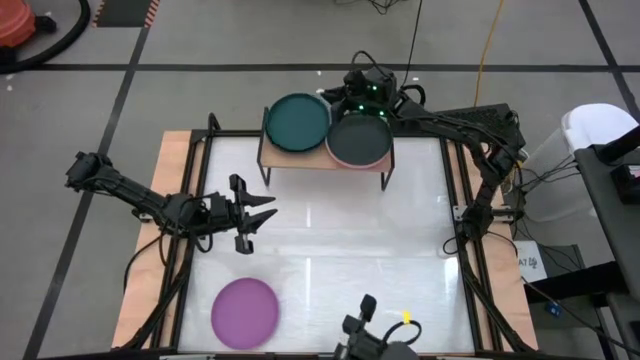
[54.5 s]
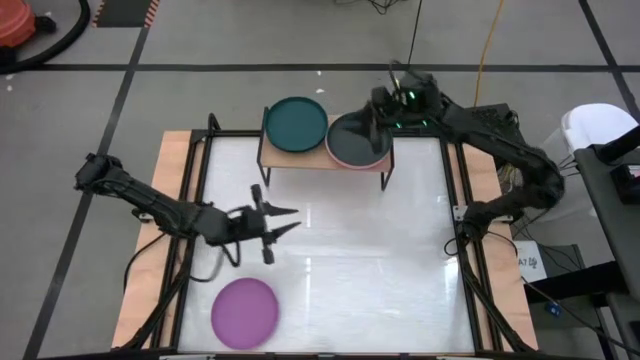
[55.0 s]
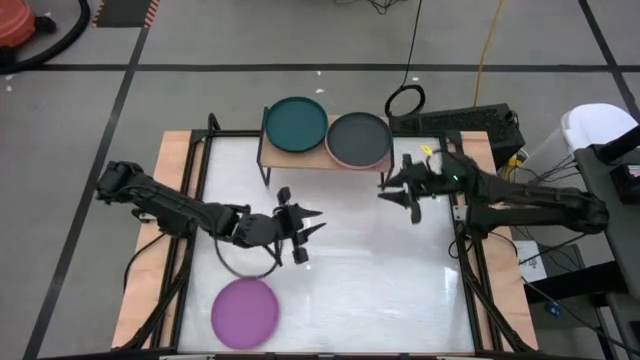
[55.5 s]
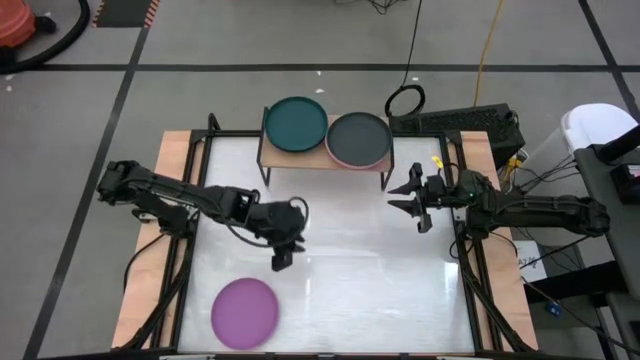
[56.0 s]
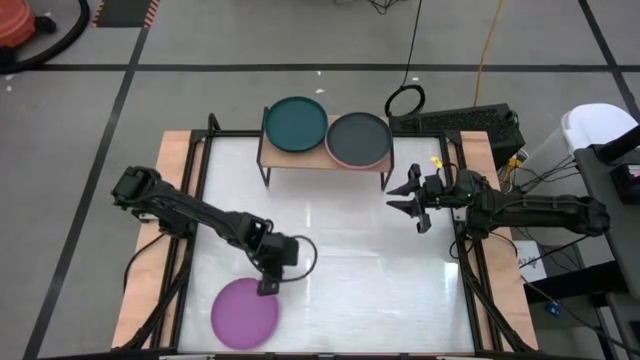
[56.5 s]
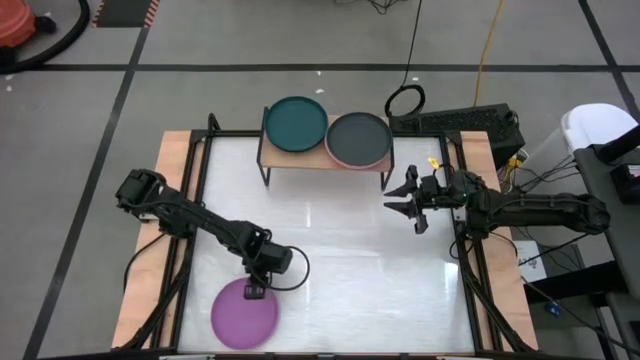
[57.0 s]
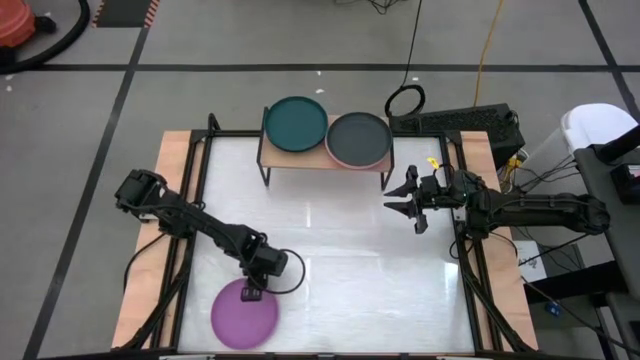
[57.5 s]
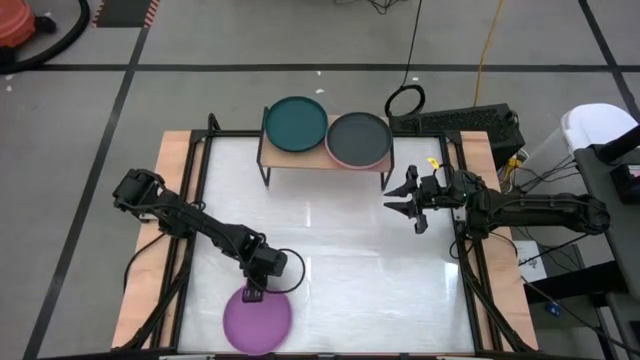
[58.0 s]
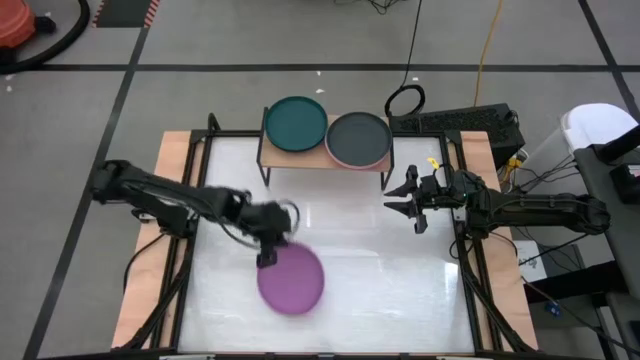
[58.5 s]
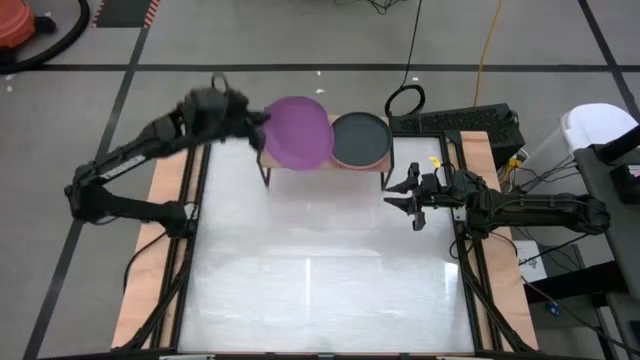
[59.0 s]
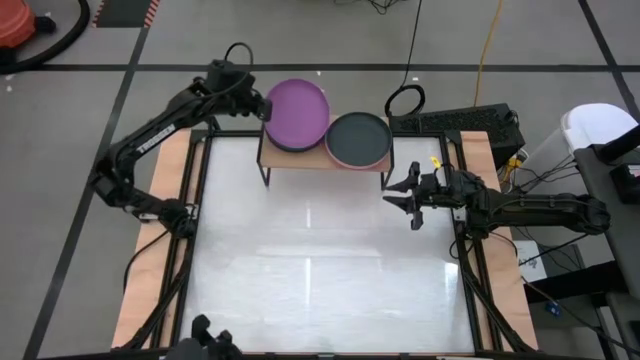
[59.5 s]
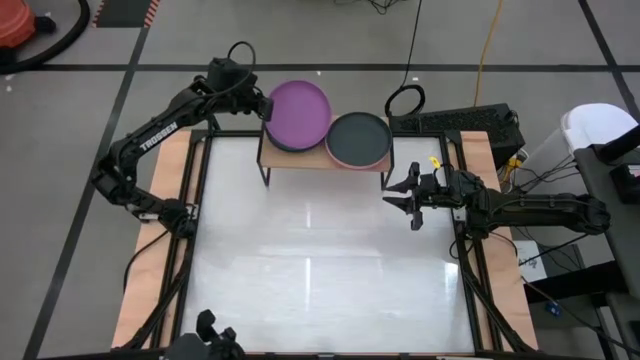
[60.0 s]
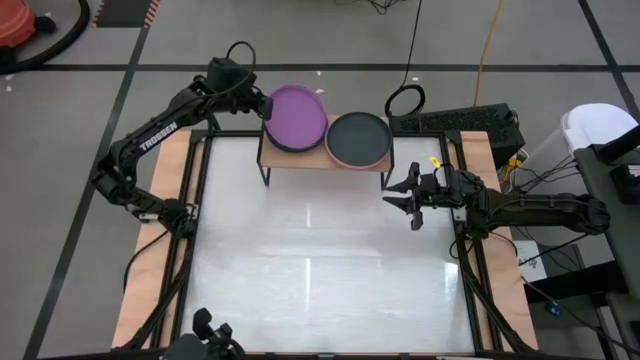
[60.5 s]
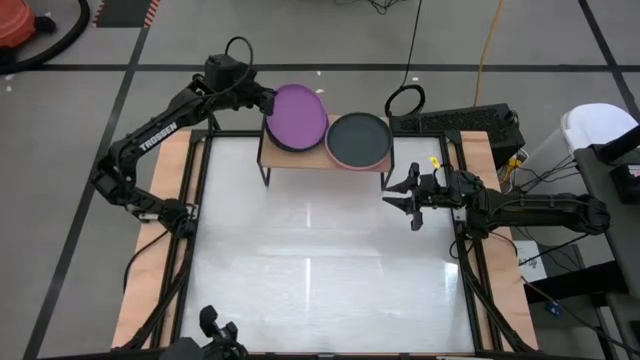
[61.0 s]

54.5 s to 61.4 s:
Task: Place and stack plates onto a shelf
Stack the violet plate on top of the dark green plate on the shelf

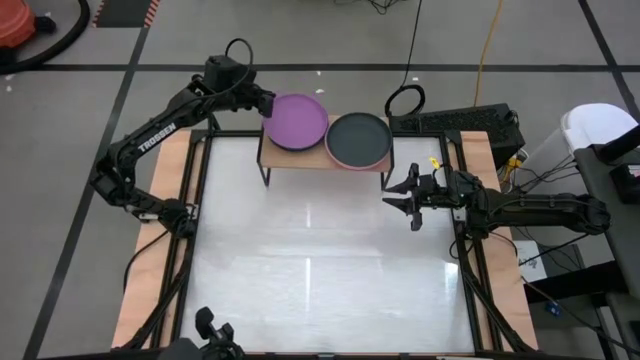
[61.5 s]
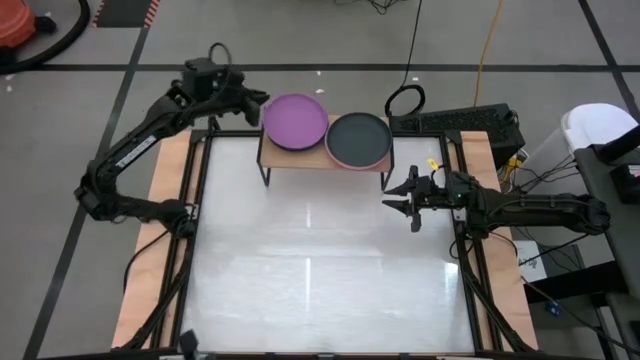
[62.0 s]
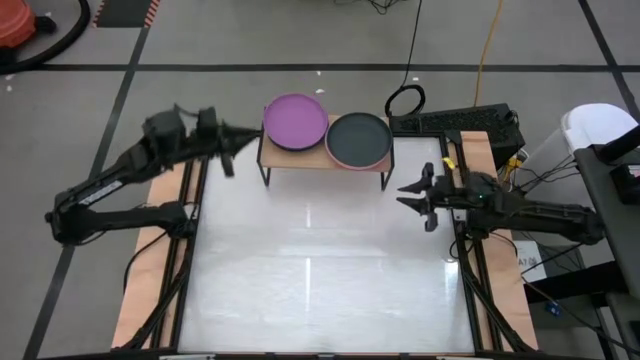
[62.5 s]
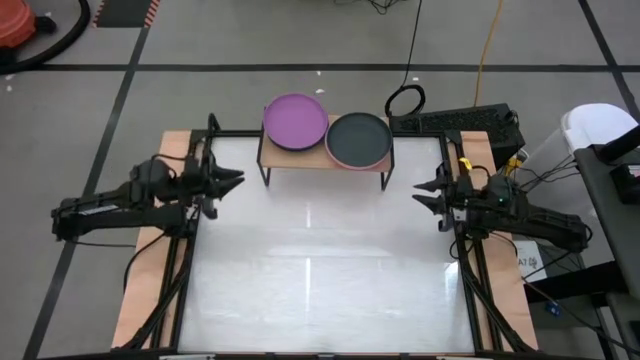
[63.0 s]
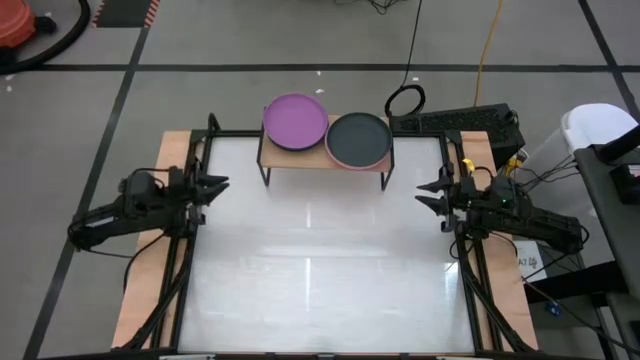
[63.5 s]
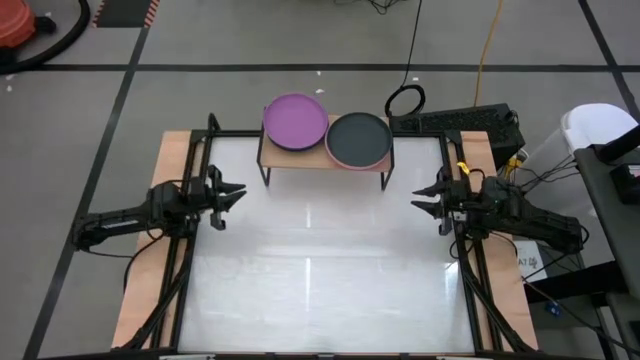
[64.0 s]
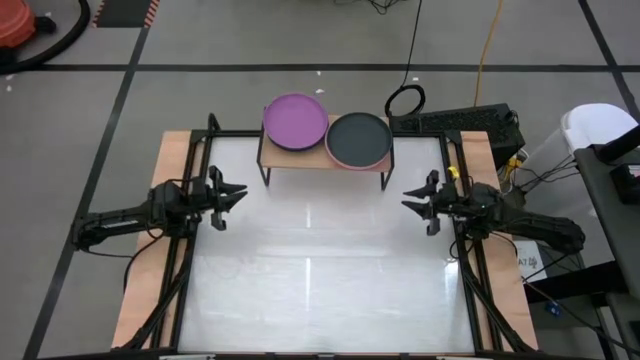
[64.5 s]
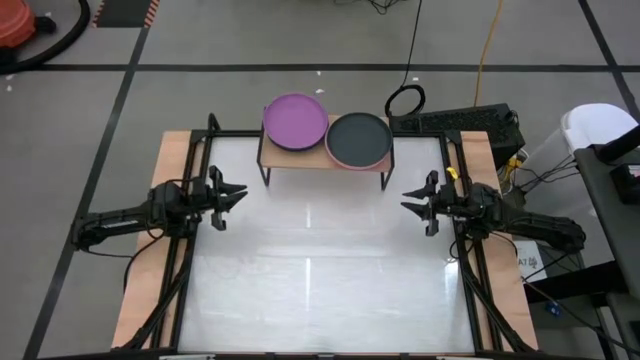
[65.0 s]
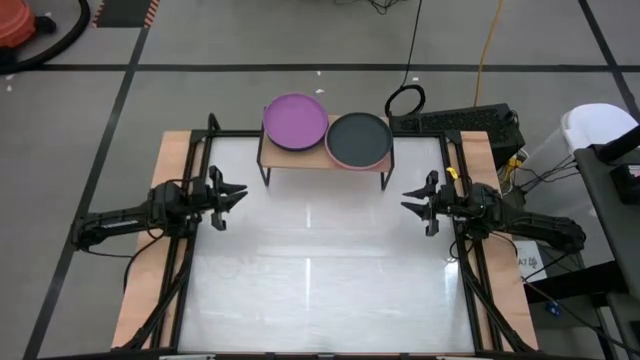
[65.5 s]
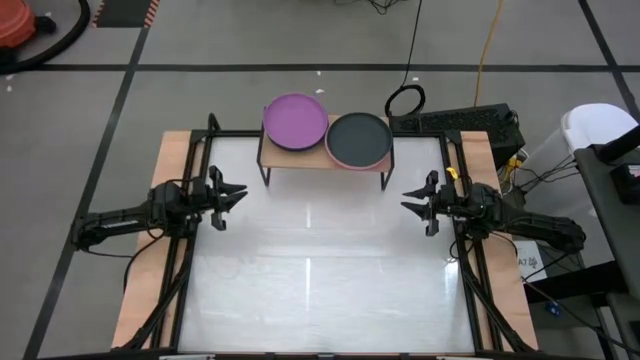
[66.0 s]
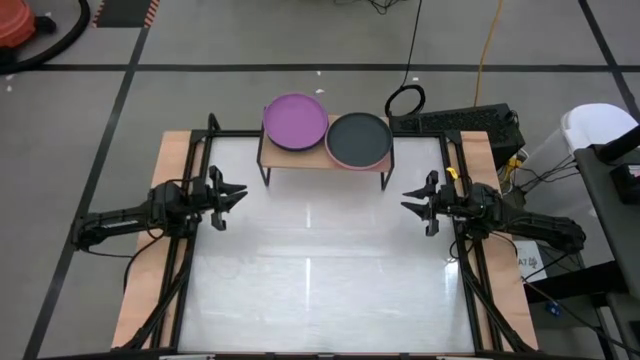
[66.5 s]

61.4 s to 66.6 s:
Return to Home Position

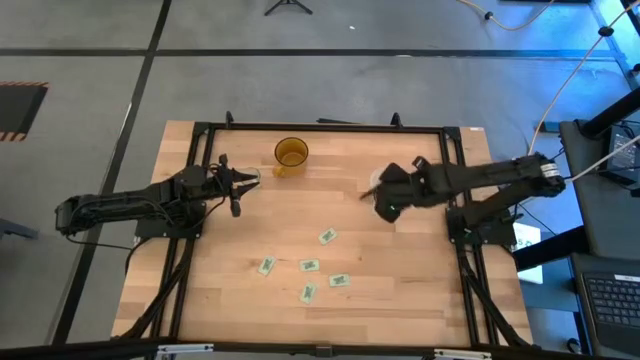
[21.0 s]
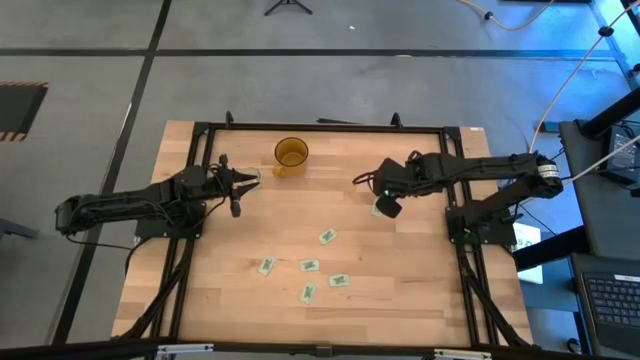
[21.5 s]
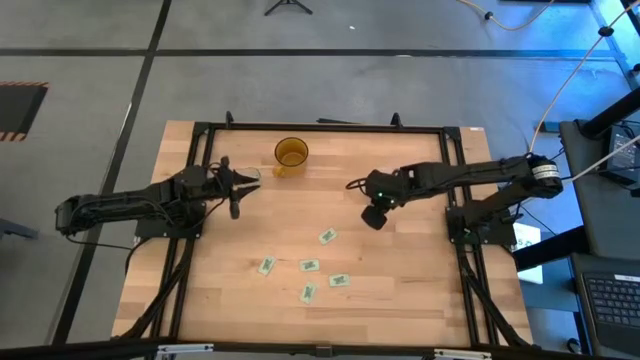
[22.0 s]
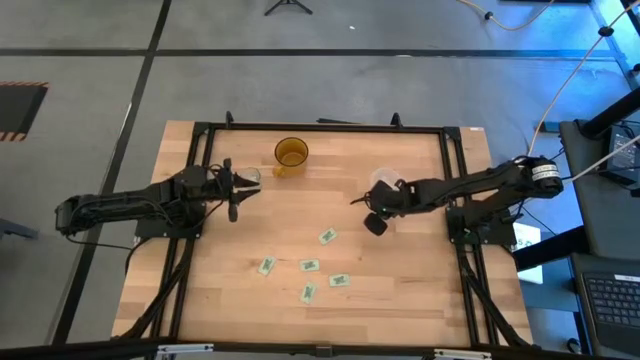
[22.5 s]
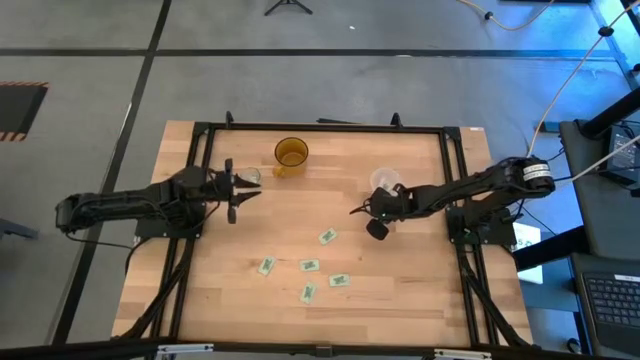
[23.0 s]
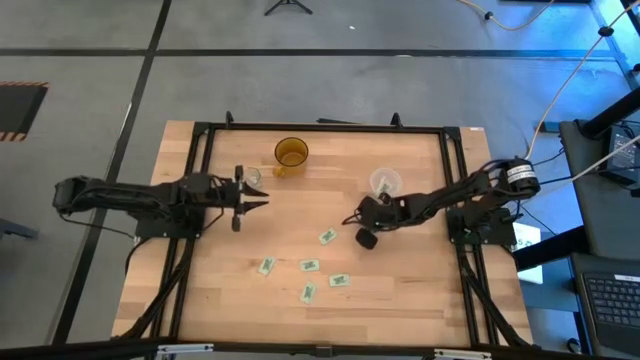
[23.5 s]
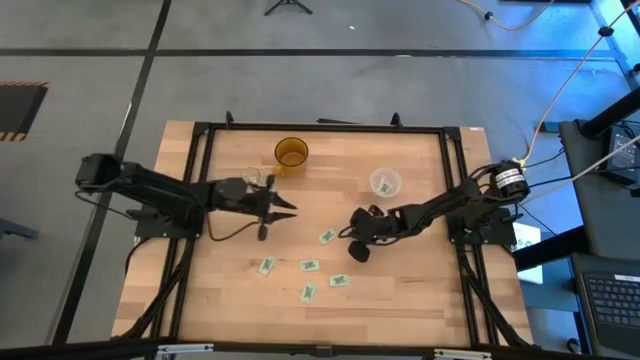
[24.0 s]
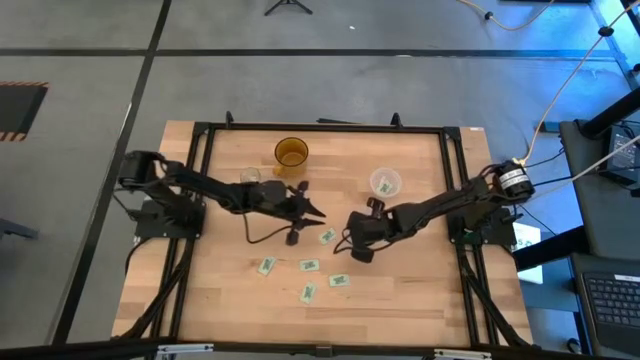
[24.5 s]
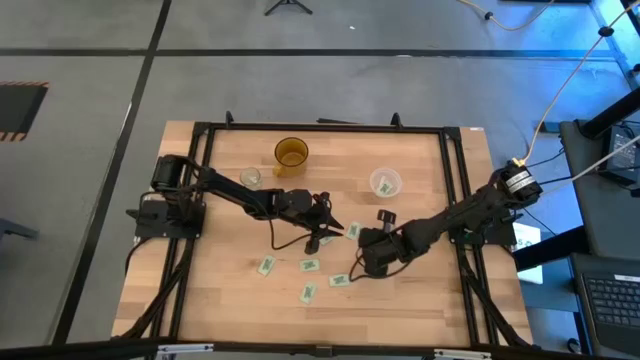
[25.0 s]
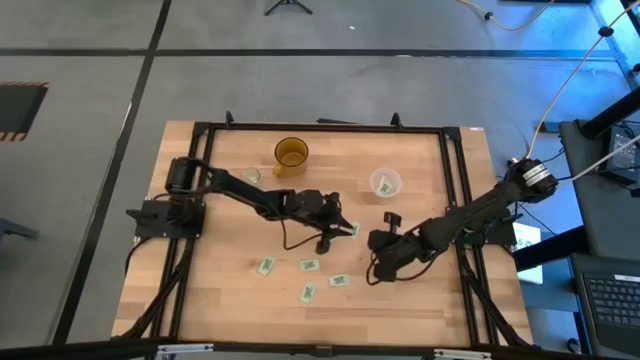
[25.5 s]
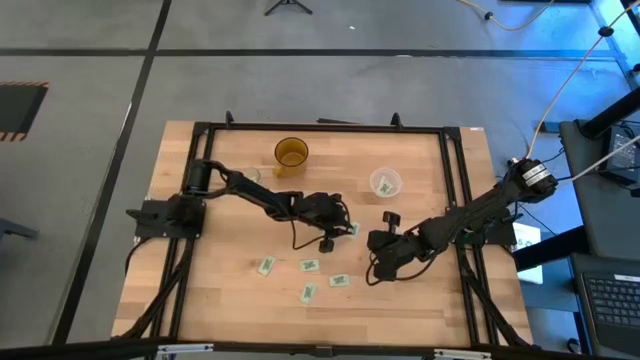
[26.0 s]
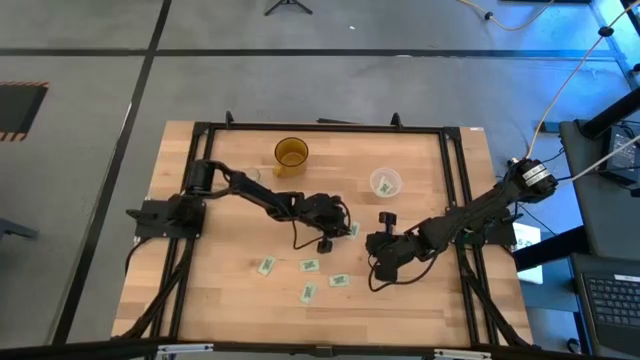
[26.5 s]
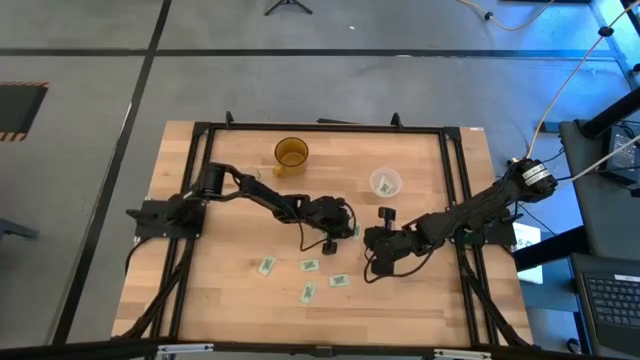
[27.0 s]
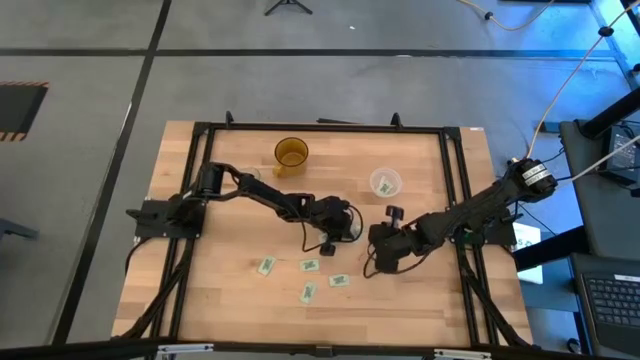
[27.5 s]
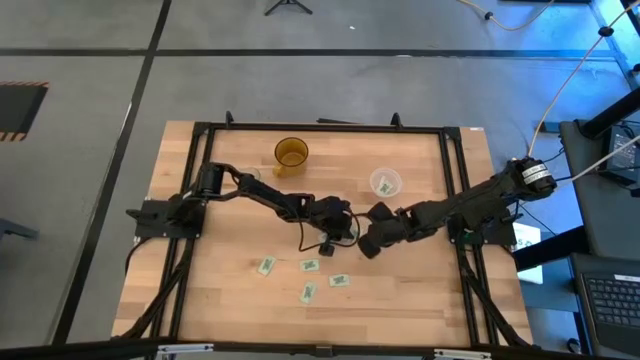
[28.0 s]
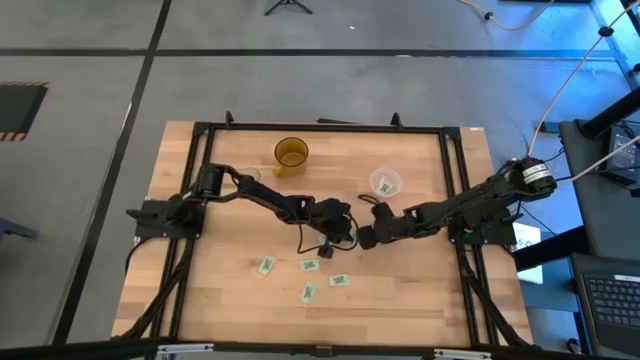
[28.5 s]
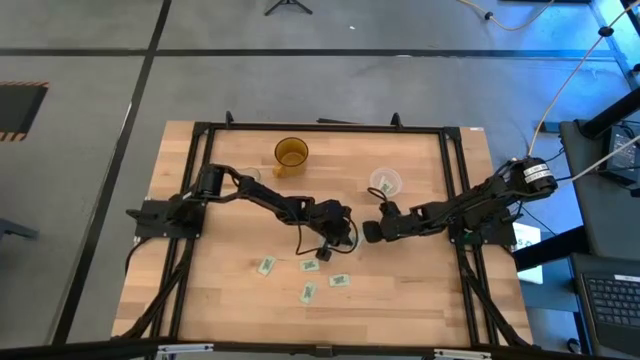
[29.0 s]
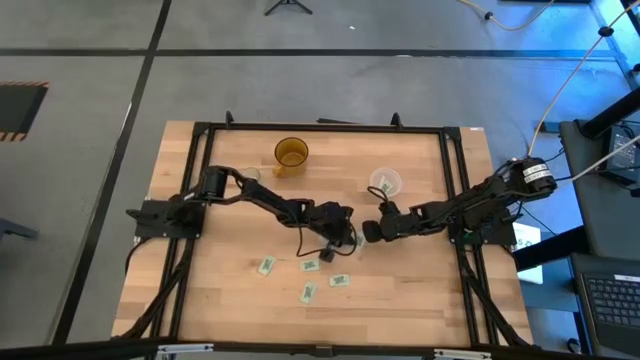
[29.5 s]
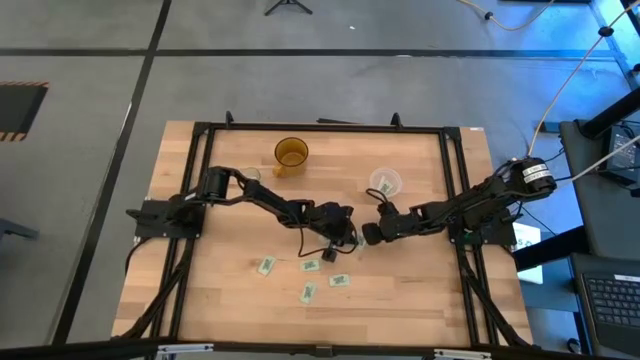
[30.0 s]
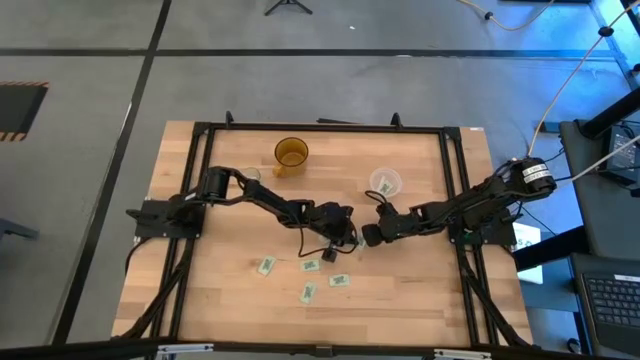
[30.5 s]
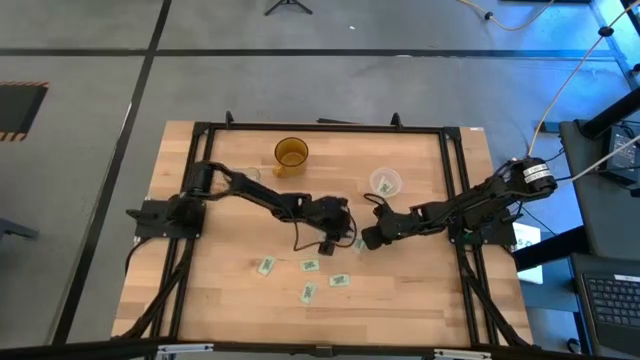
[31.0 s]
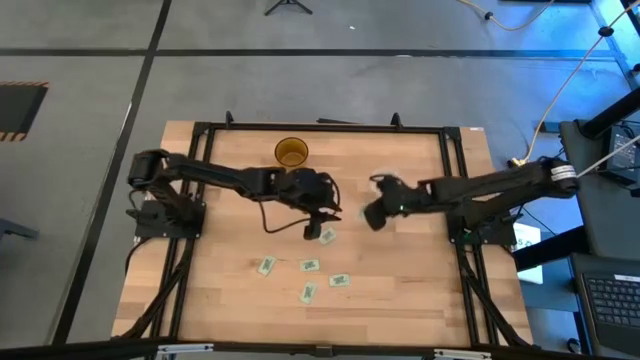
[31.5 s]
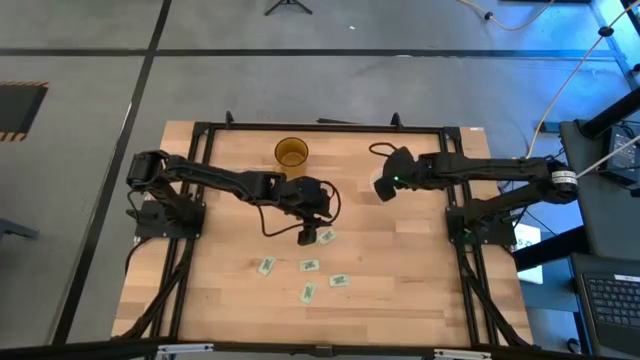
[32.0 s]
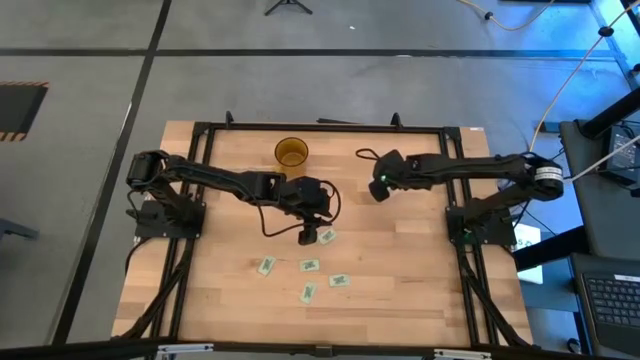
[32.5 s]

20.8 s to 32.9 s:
Task: Pick and place Stevia / Truvia into bins
Put the stevia packet into the transparent container
